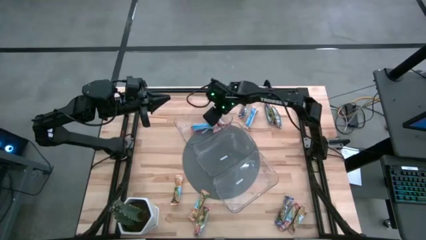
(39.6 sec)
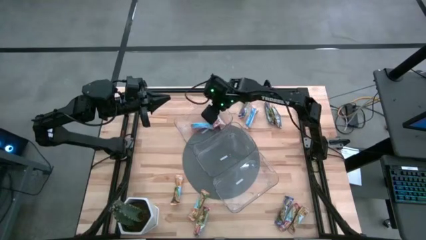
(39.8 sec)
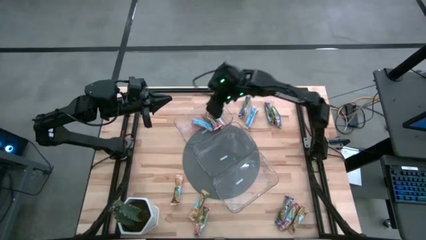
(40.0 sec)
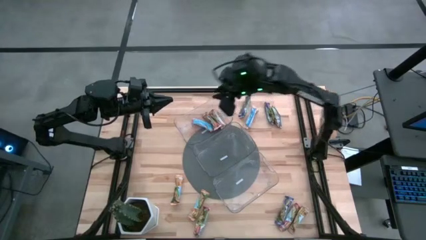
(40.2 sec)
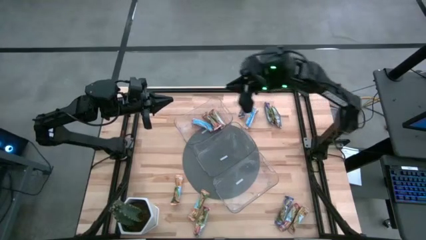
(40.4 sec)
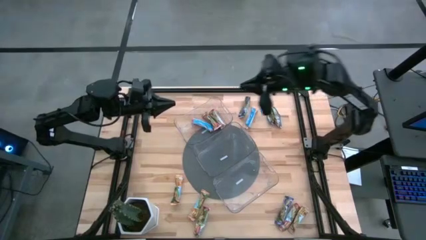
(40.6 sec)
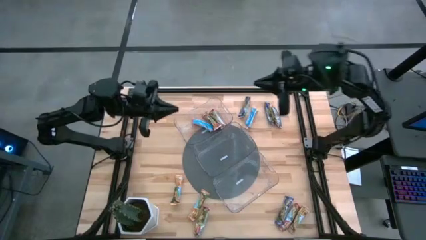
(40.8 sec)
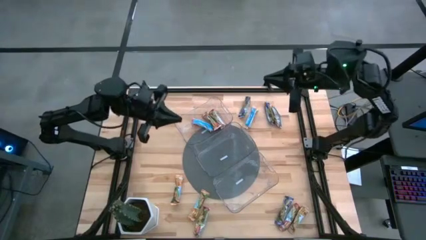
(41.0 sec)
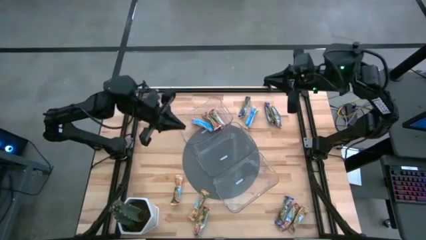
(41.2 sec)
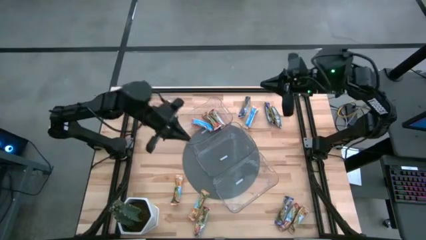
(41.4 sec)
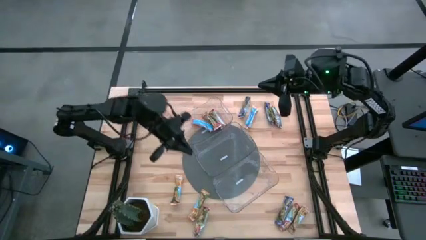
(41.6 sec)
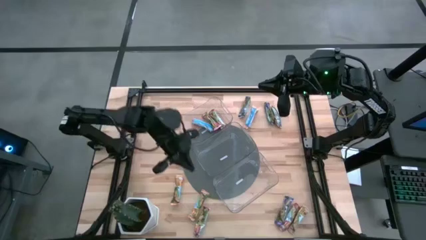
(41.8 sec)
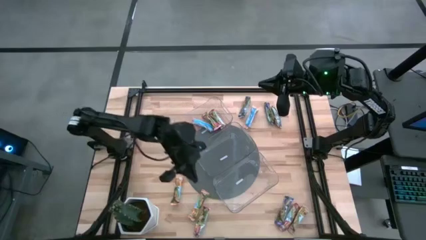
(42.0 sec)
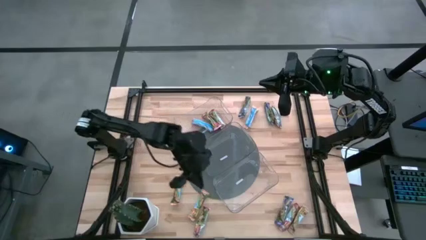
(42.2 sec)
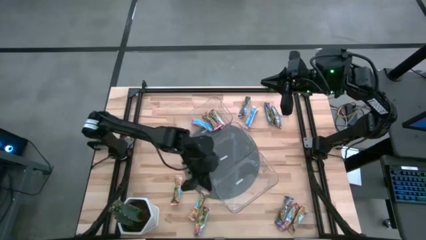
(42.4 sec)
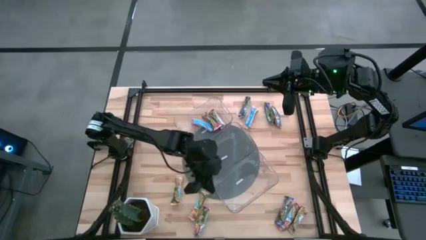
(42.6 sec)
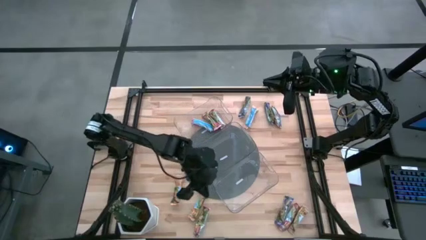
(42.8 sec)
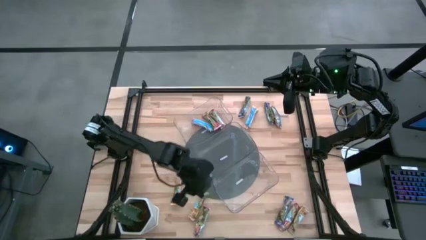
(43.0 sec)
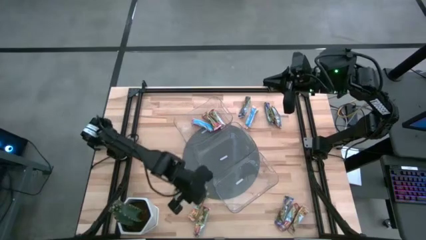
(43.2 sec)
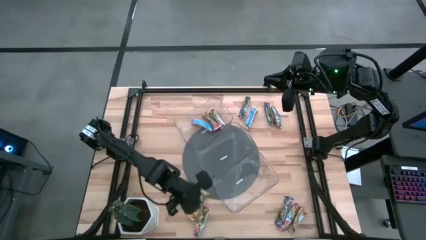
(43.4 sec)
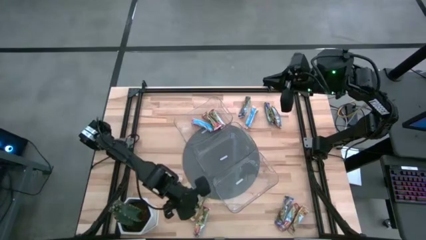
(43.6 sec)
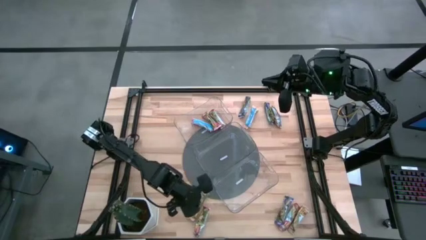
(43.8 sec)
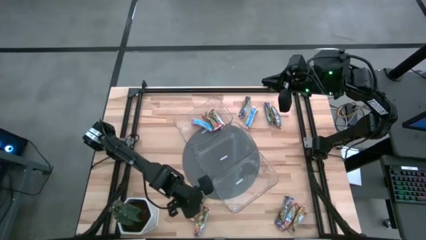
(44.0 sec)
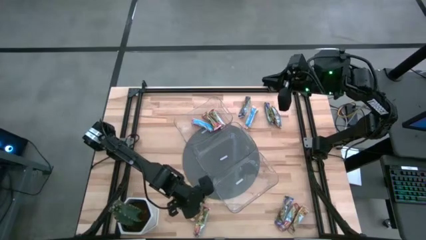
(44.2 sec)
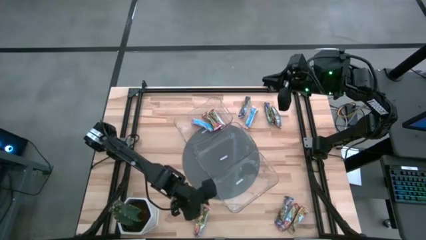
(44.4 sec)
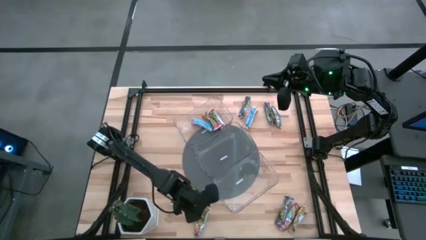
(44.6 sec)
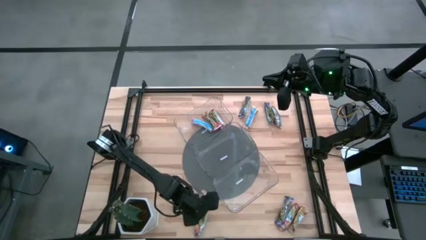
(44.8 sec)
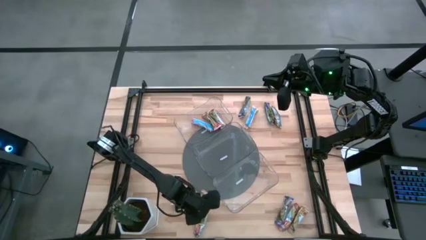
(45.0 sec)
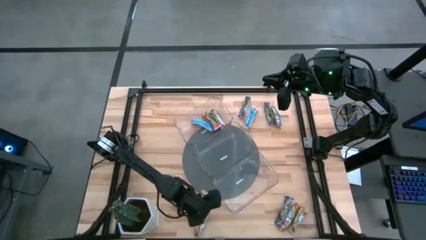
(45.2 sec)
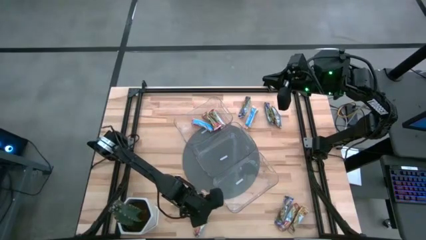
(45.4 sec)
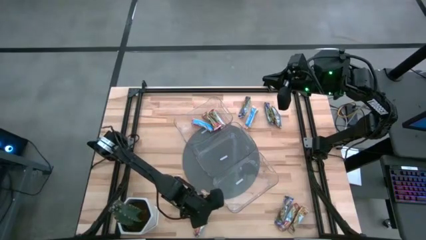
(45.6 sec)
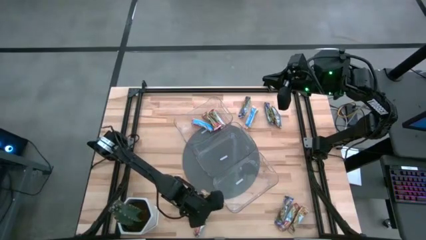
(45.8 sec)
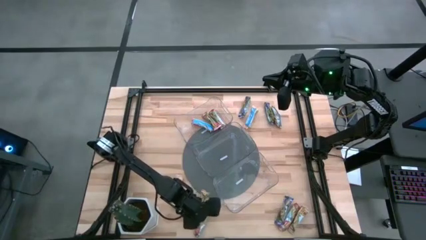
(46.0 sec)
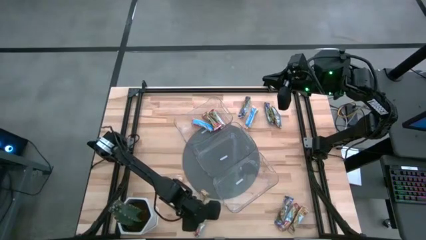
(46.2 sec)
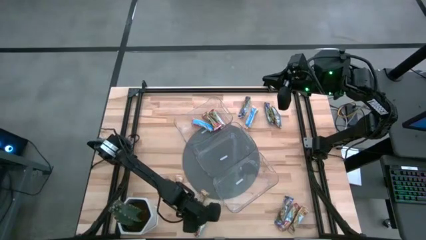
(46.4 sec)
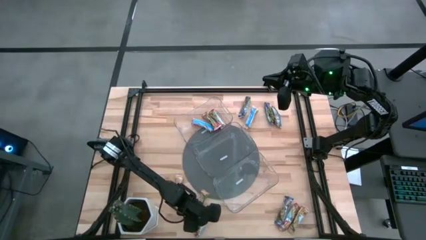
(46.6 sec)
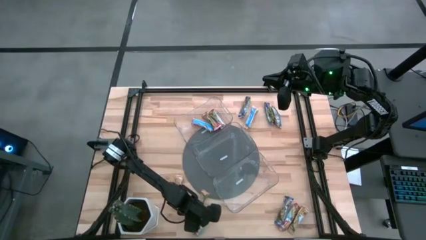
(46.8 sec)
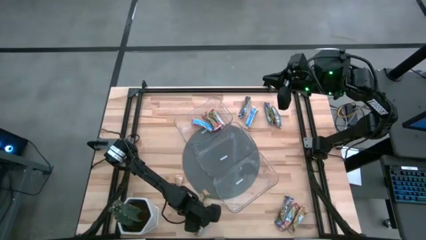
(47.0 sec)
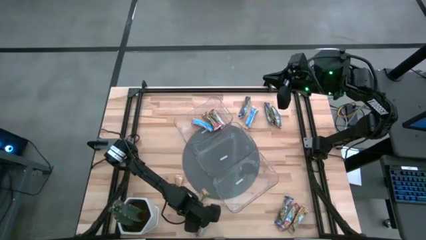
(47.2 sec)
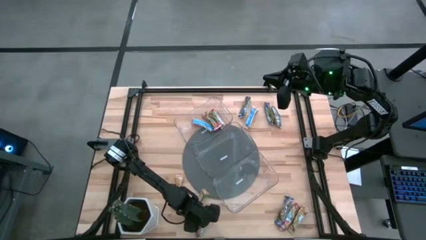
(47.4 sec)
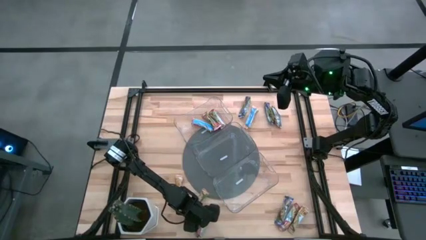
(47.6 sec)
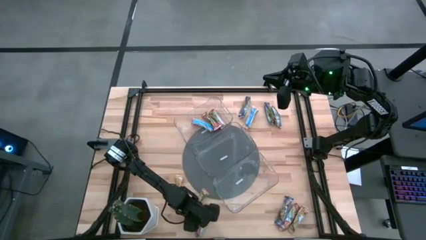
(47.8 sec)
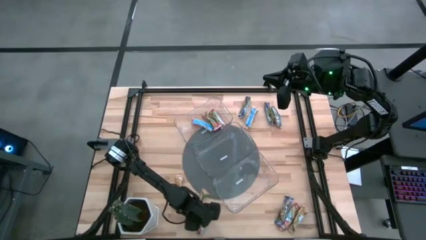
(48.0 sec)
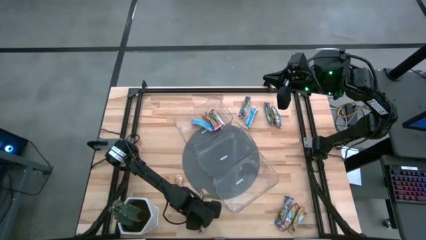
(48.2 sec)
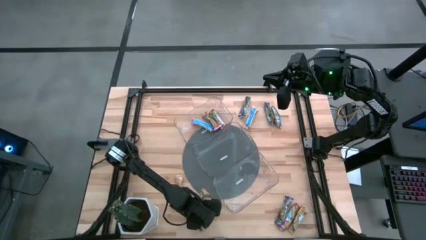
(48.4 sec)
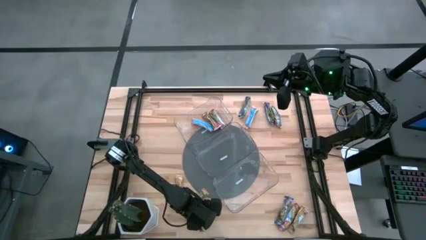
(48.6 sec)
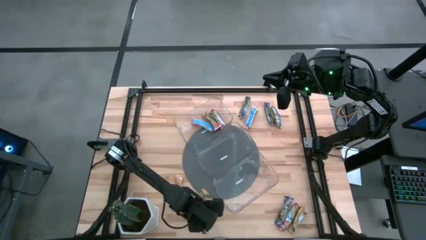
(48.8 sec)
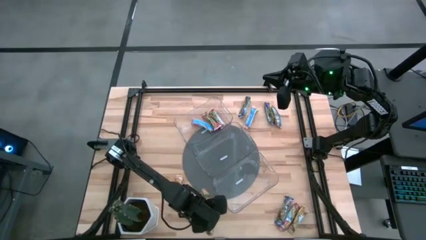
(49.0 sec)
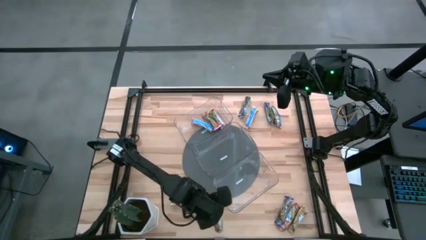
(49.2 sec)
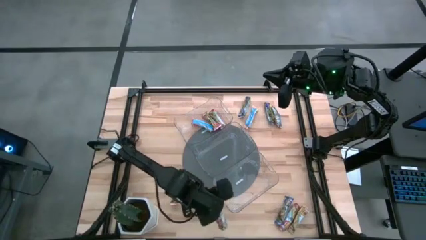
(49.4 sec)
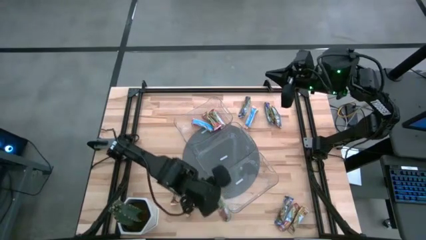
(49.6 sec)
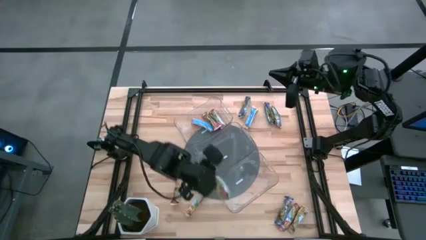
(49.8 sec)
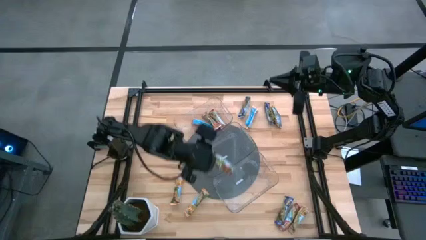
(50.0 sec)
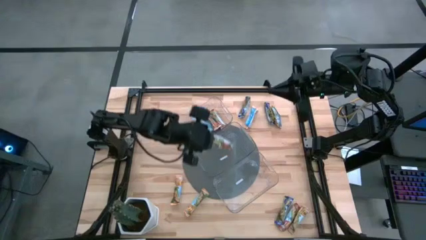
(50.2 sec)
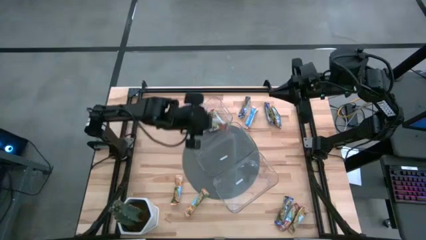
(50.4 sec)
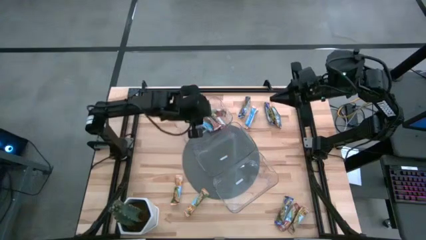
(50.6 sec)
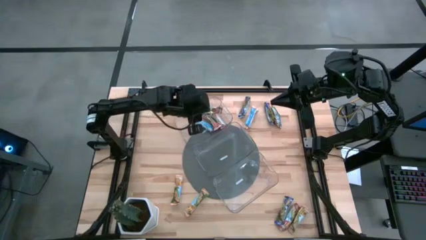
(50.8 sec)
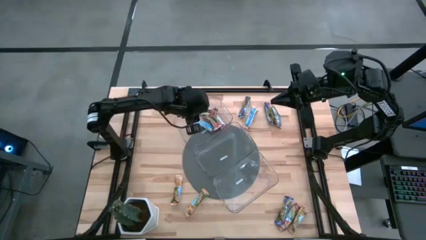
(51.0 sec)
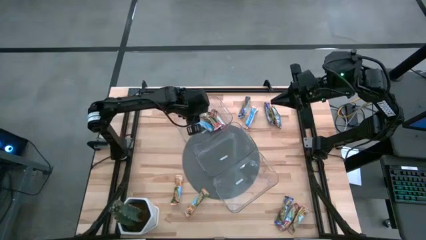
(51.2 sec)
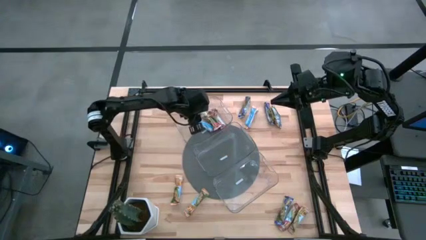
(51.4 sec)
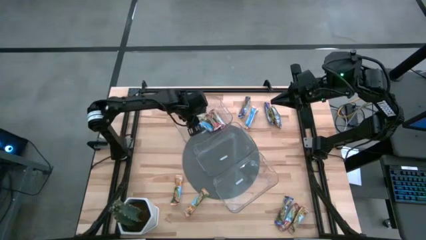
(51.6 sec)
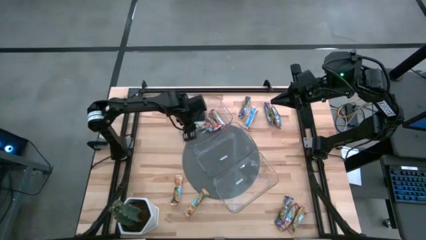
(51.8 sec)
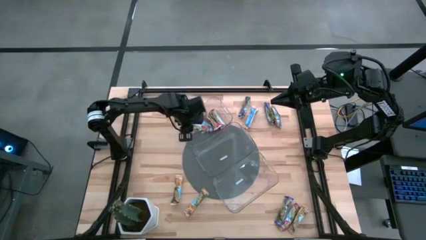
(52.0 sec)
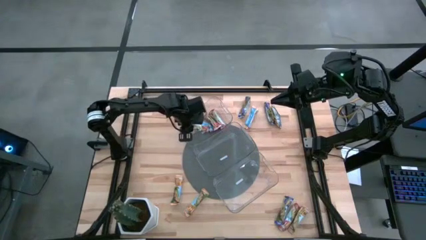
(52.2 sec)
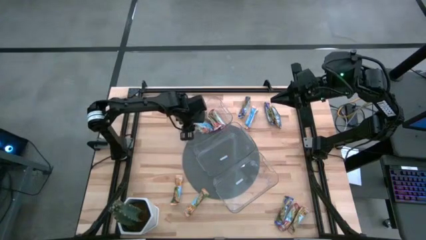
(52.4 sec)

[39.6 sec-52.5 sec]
Task: Pick and place Granola Bars by type
Put the red granola bar into the top transparent bin
